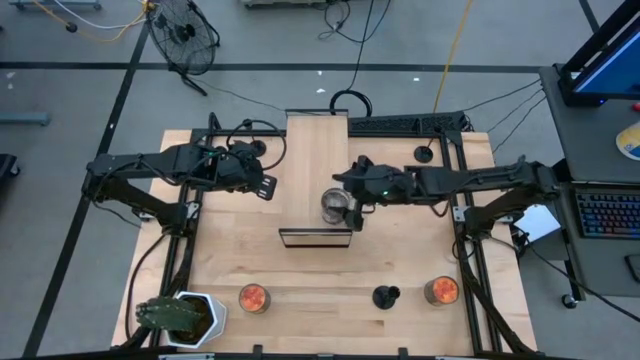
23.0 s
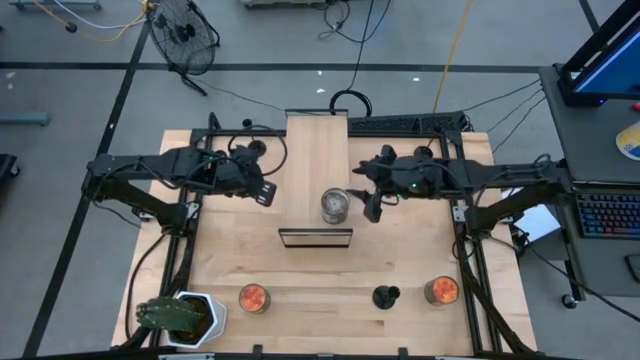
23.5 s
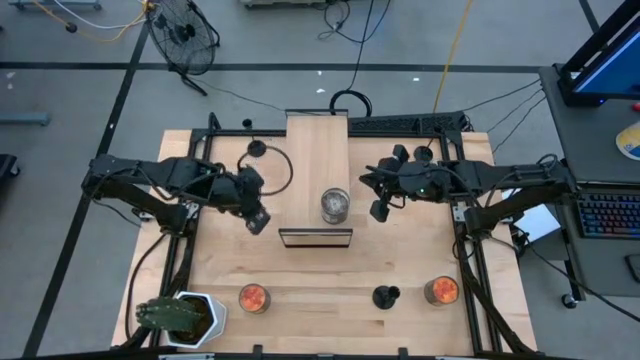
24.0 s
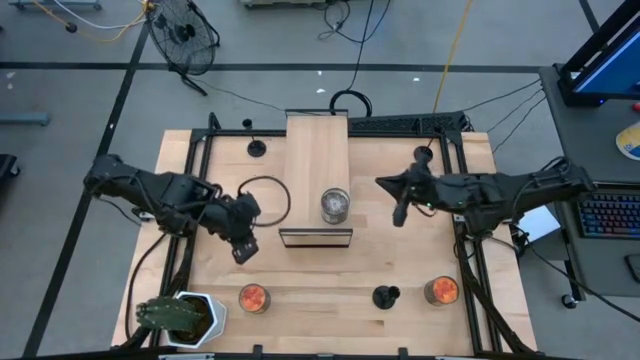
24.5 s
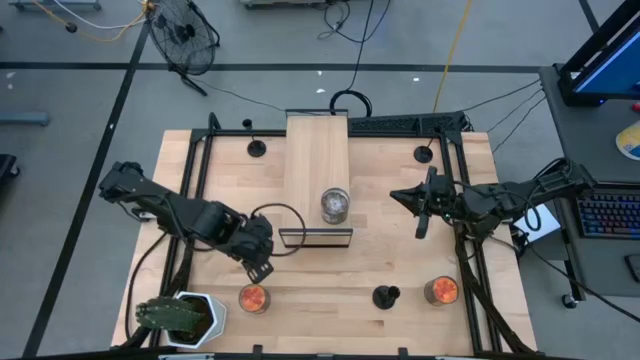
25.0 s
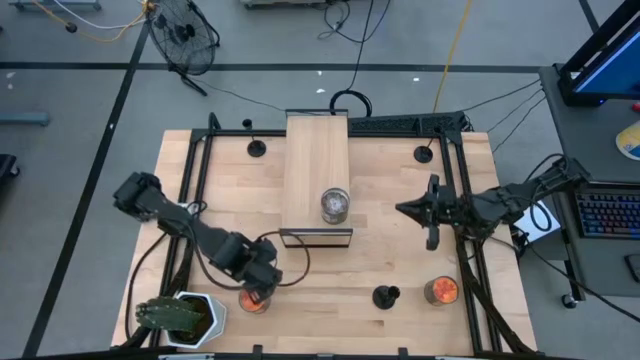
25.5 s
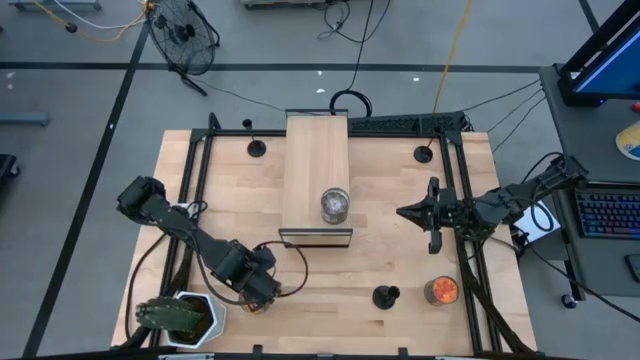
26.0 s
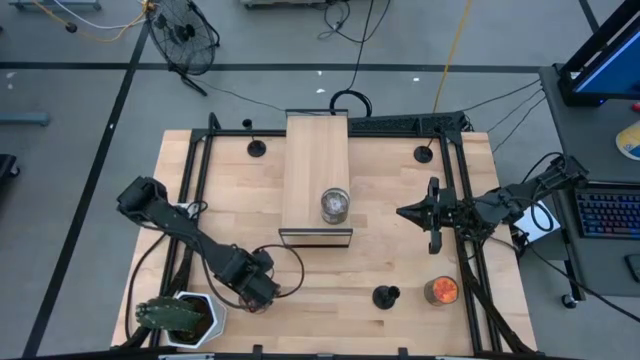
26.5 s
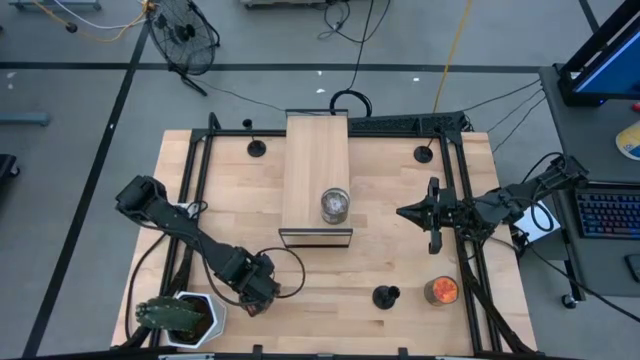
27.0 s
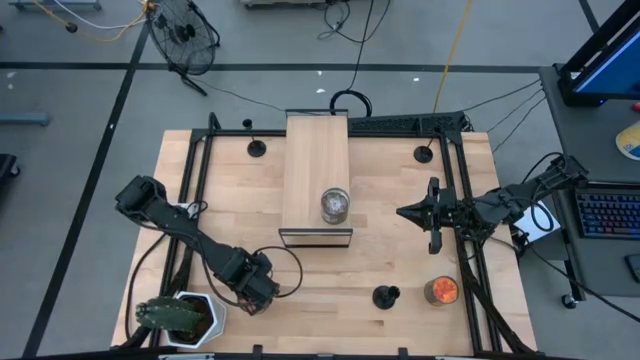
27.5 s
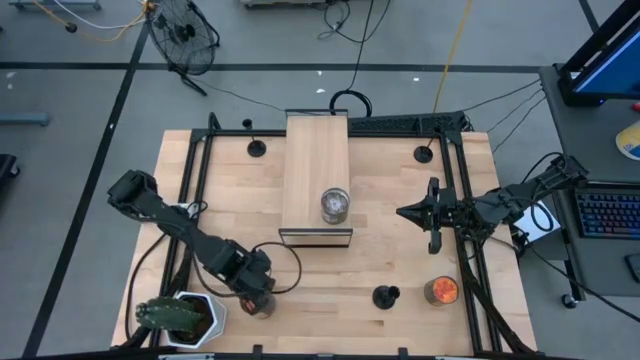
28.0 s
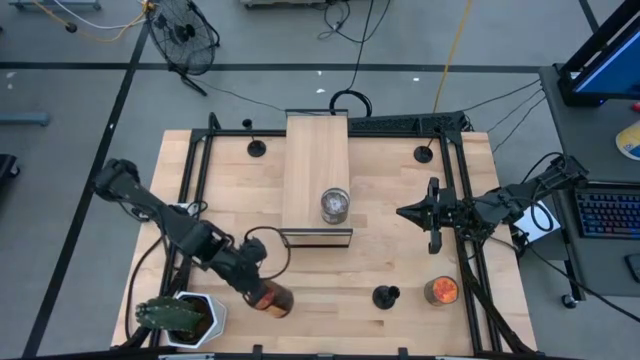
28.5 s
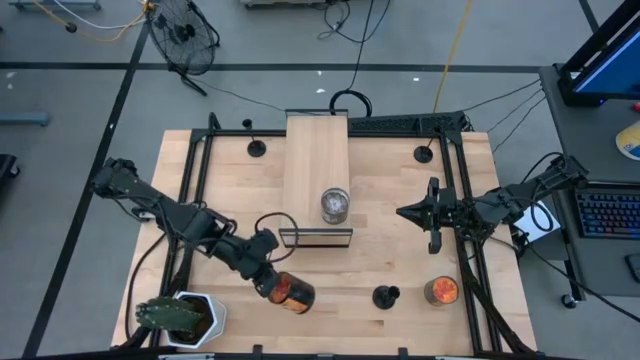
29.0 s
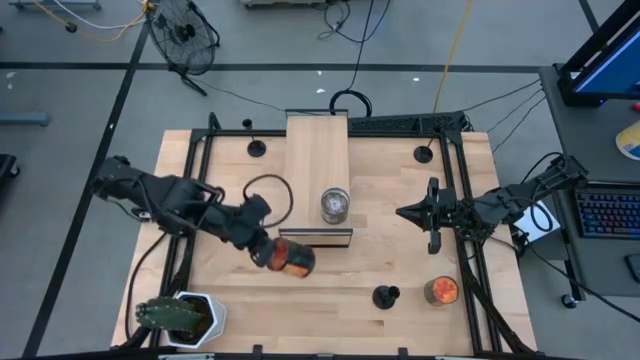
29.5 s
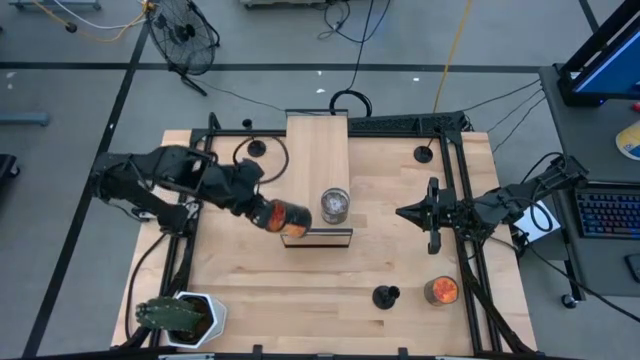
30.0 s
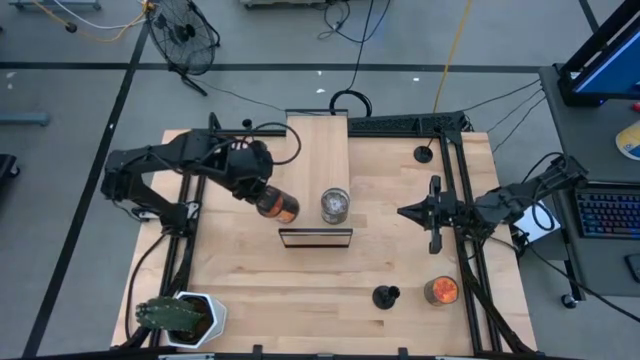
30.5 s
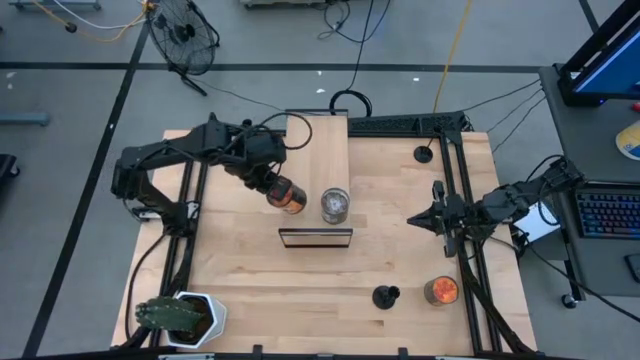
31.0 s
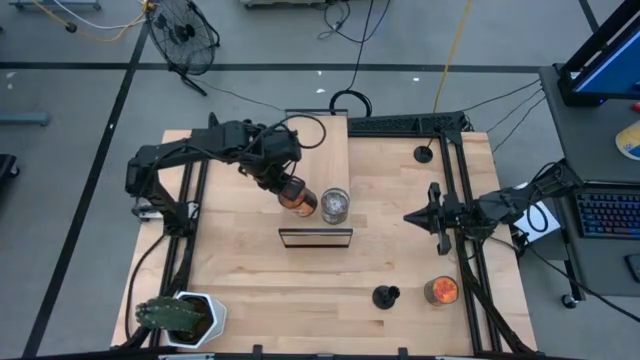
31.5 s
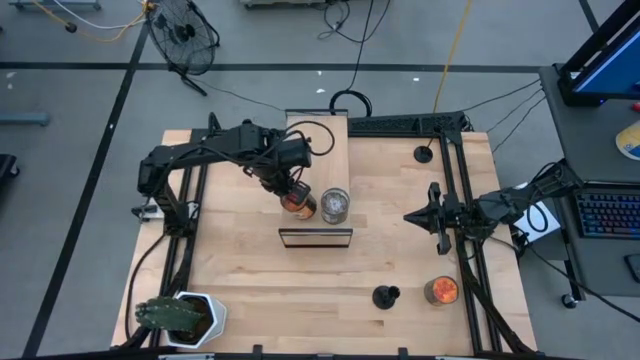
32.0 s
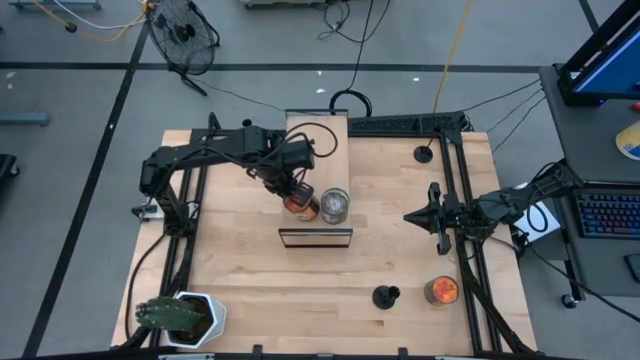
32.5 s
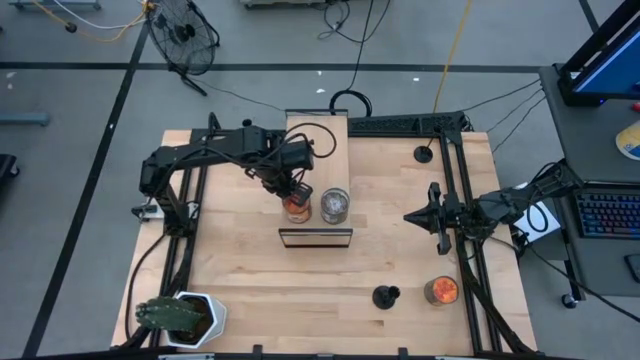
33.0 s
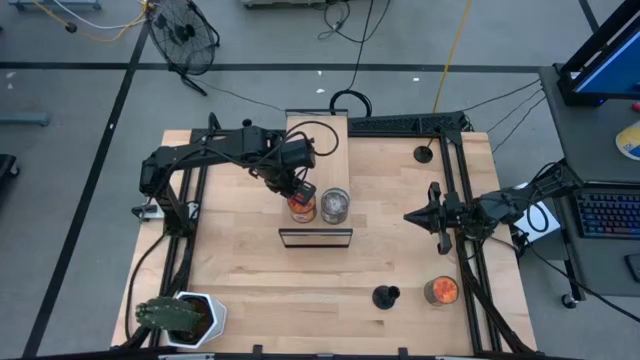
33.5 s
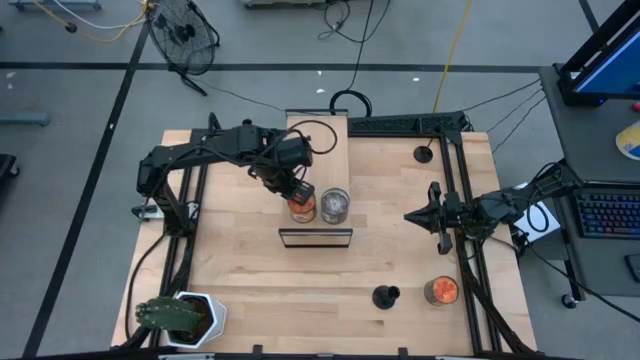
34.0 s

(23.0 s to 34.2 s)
Task: Pick & Place candle stick holders
Put the left orange scented candle on the shelf

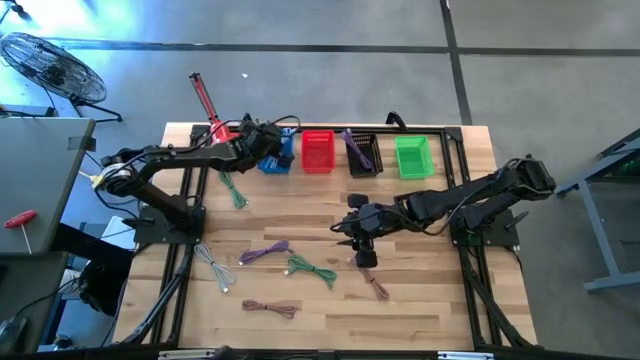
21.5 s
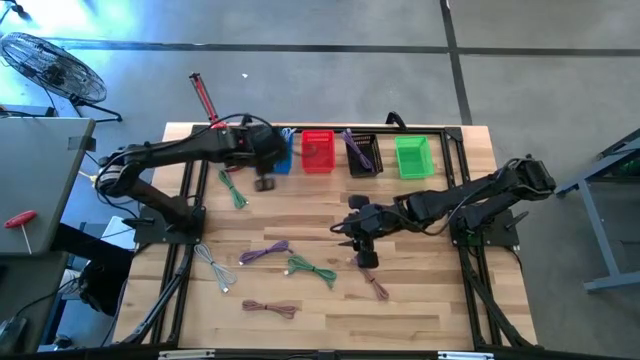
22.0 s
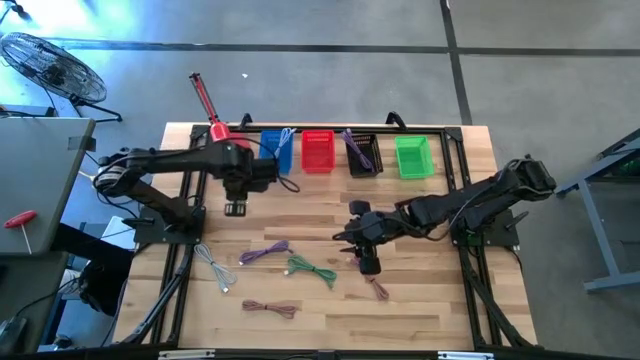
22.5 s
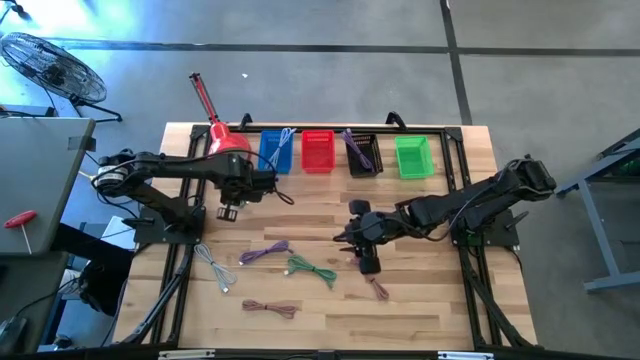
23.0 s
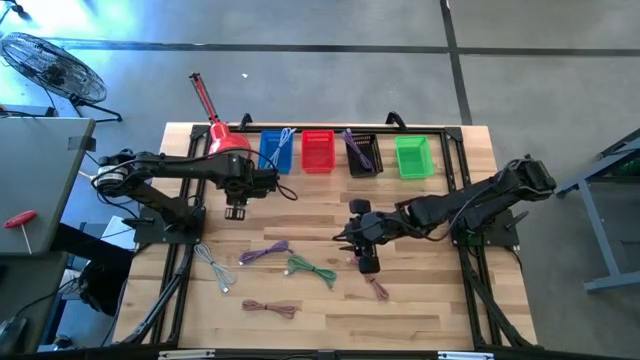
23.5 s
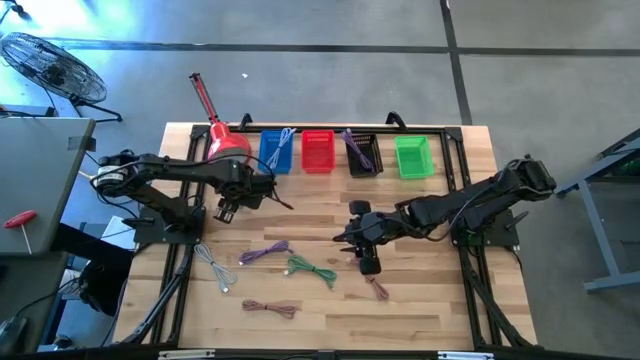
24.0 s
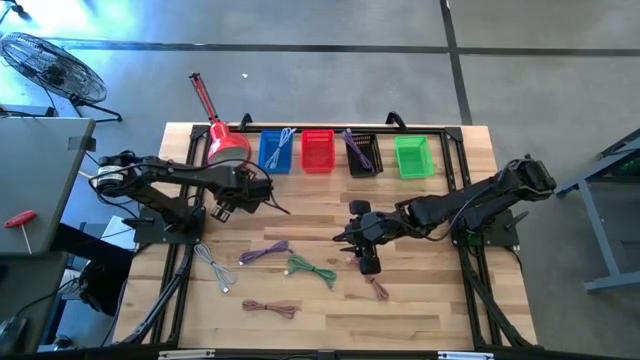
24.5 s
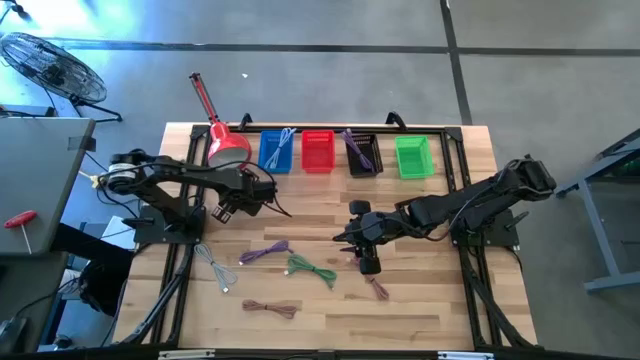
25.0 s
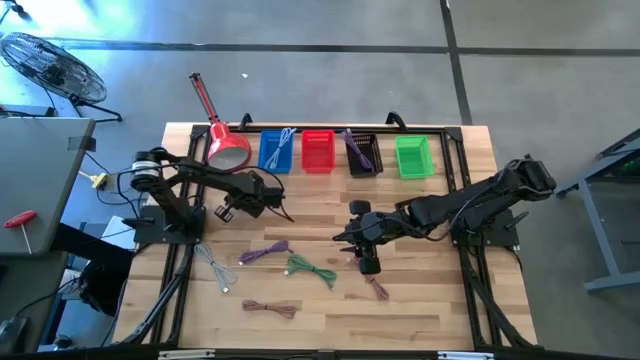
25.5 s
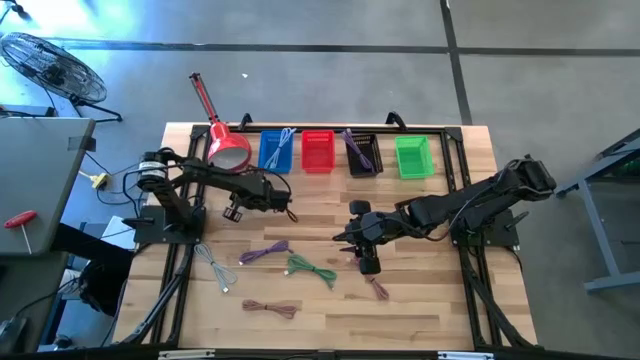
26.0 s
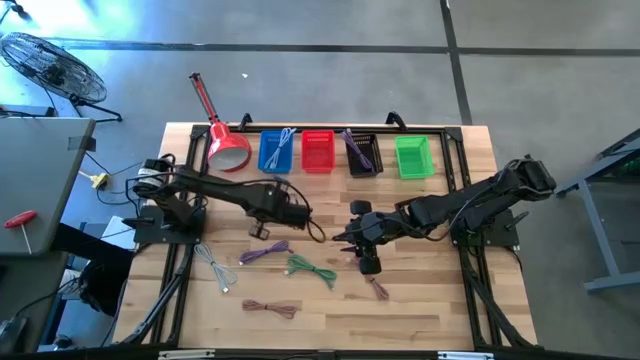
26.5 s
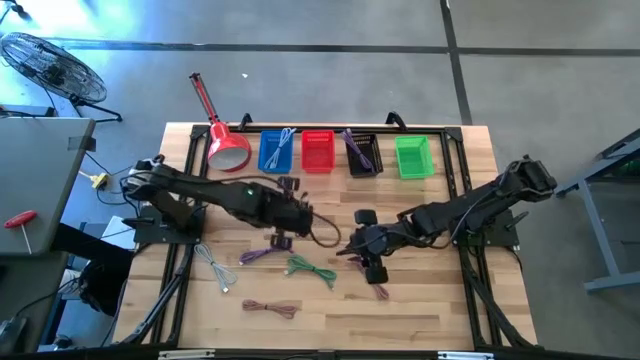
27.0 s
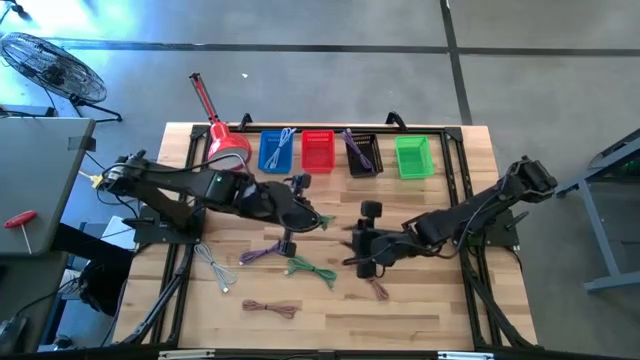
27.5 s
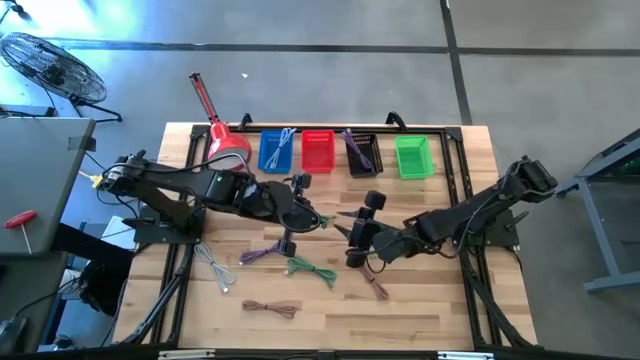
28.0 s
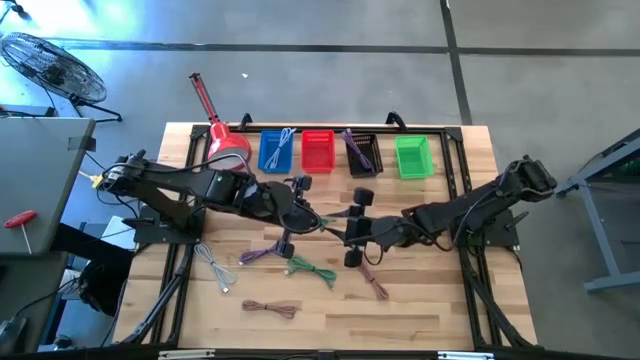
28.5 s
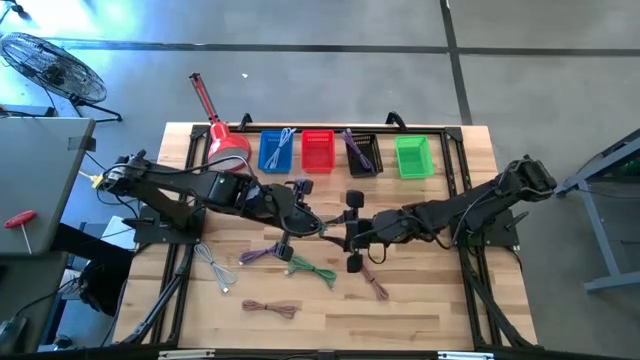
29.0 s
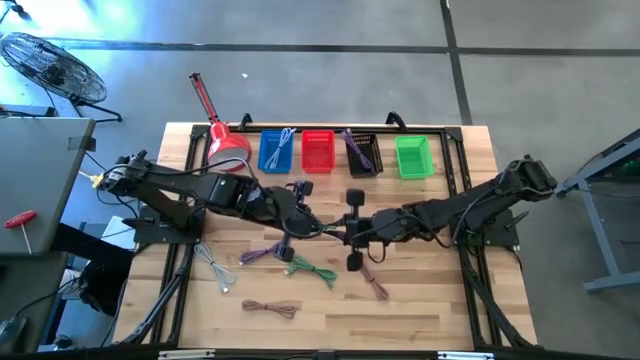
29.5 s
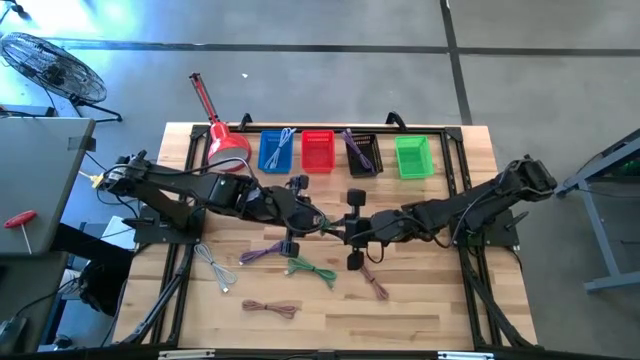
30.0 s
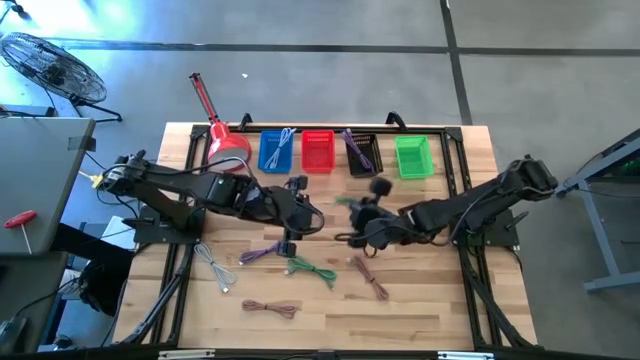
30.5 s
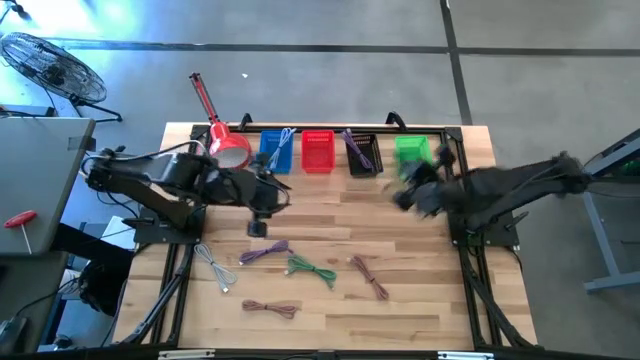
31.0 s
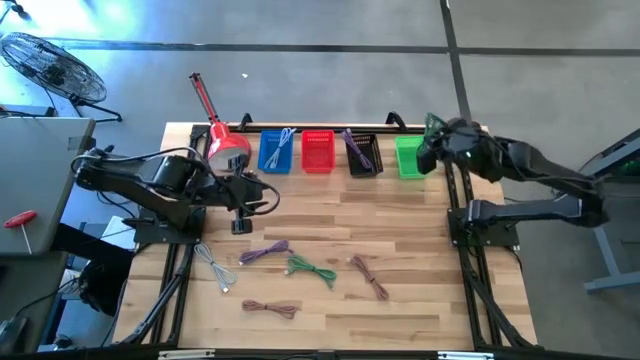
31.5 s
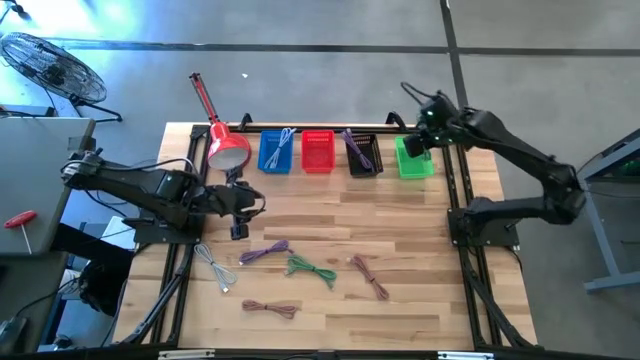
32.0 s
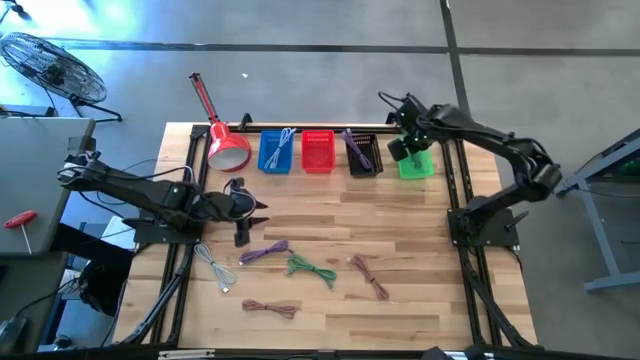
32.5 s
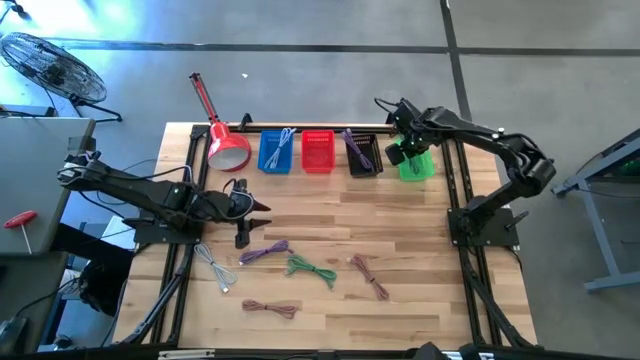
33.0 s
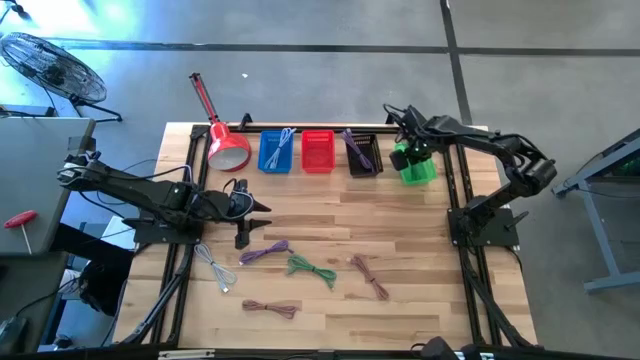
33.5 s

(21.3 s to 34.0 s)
Task: Pick & Place USB Port
Put the left green charger cable into the green bin
